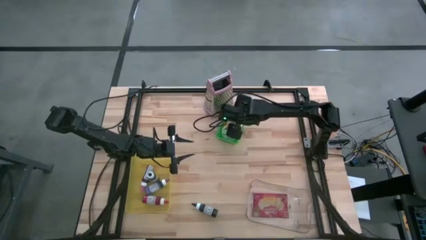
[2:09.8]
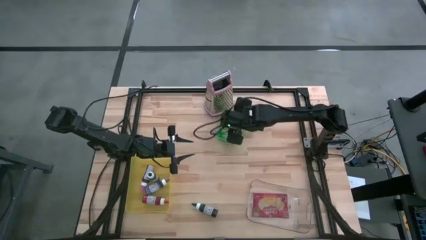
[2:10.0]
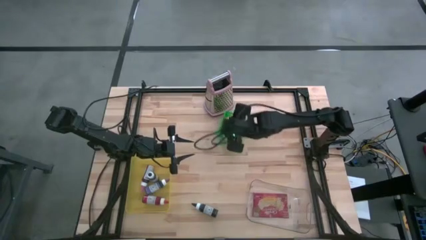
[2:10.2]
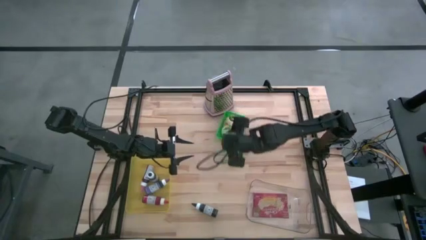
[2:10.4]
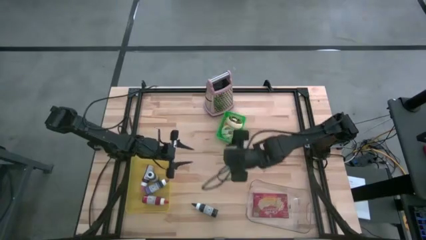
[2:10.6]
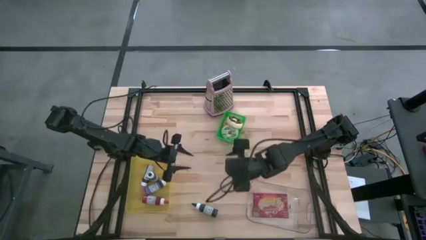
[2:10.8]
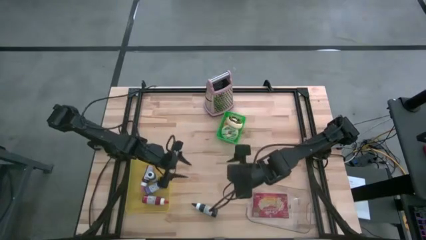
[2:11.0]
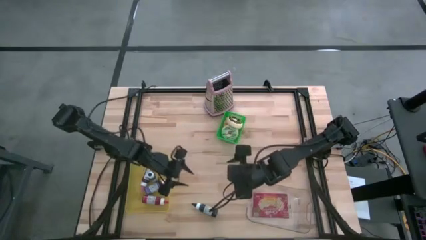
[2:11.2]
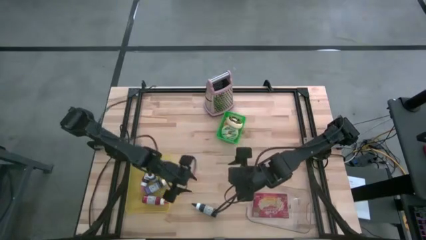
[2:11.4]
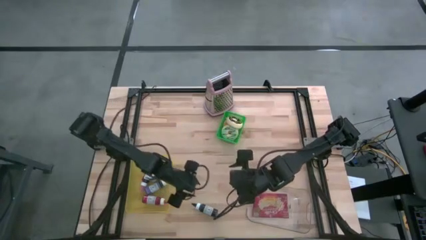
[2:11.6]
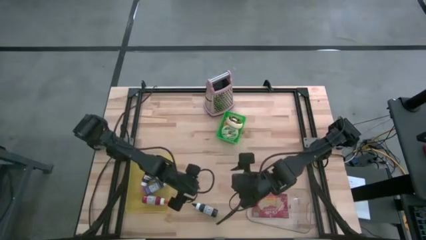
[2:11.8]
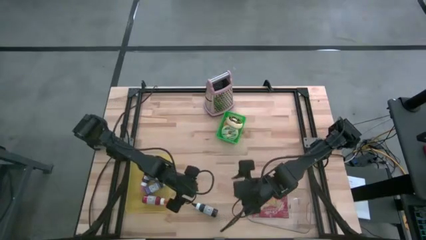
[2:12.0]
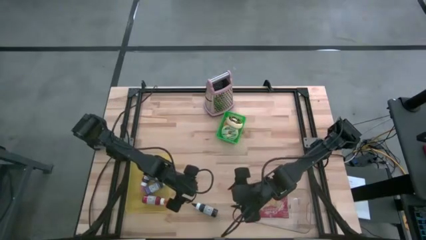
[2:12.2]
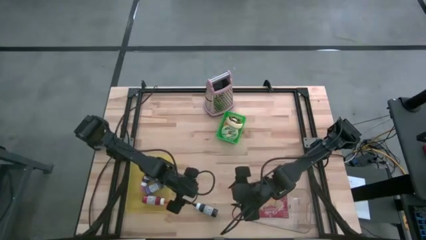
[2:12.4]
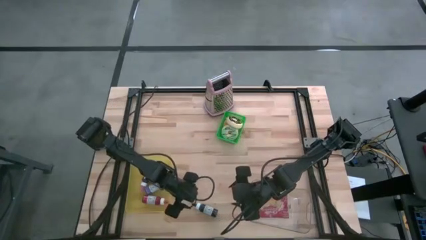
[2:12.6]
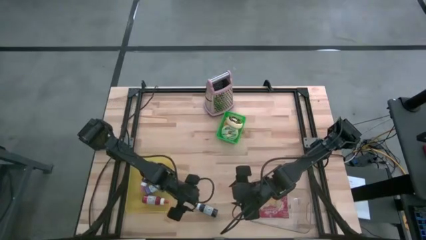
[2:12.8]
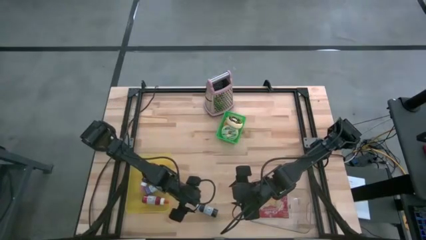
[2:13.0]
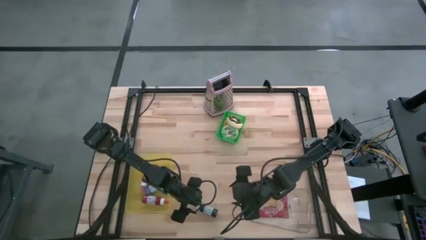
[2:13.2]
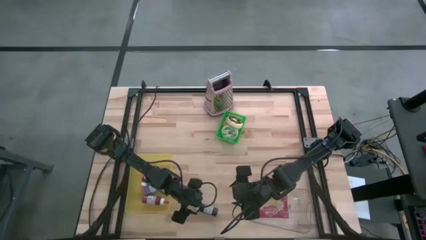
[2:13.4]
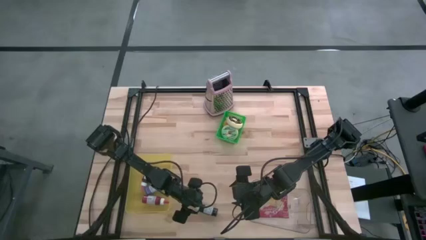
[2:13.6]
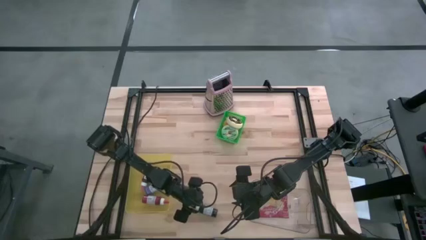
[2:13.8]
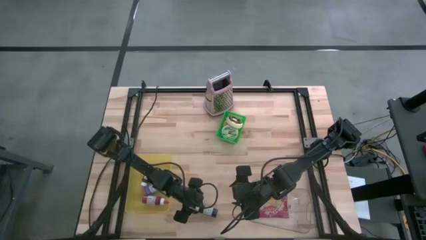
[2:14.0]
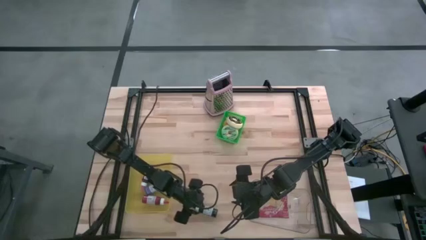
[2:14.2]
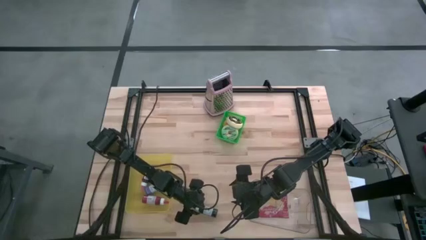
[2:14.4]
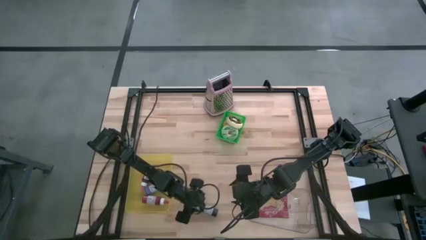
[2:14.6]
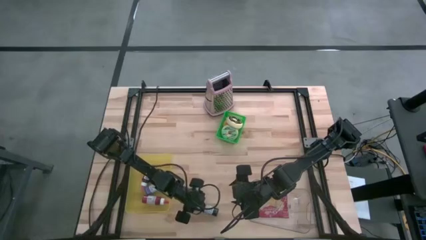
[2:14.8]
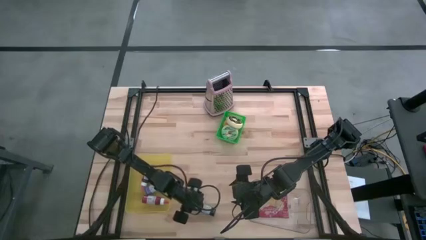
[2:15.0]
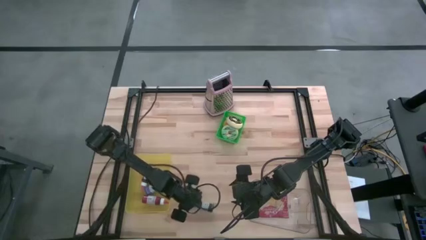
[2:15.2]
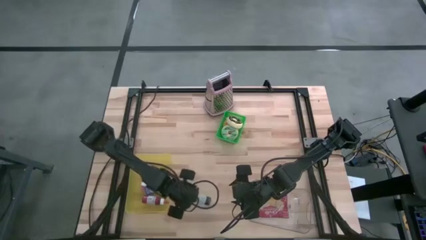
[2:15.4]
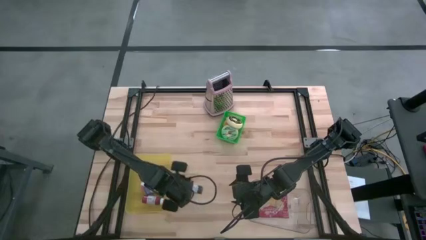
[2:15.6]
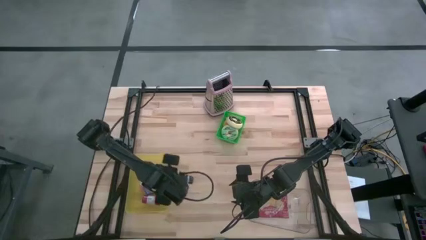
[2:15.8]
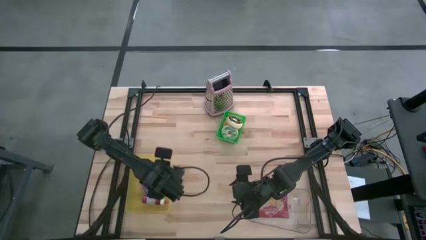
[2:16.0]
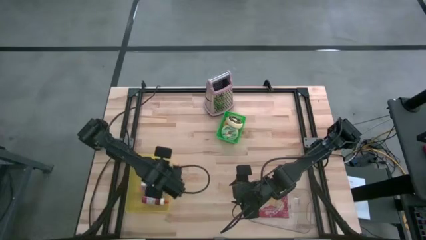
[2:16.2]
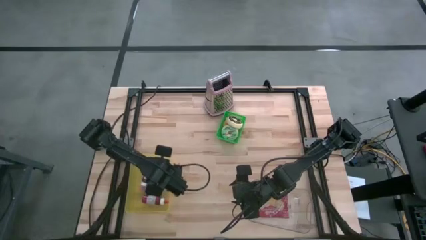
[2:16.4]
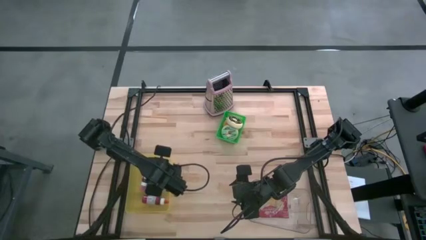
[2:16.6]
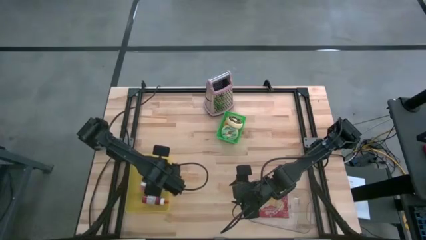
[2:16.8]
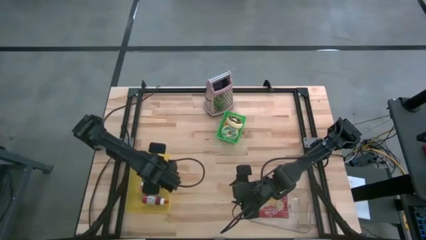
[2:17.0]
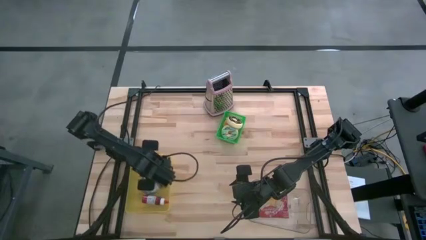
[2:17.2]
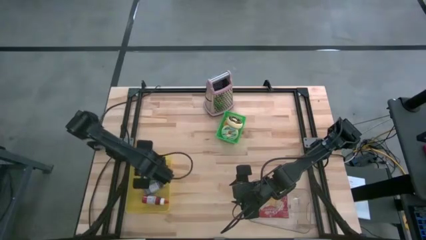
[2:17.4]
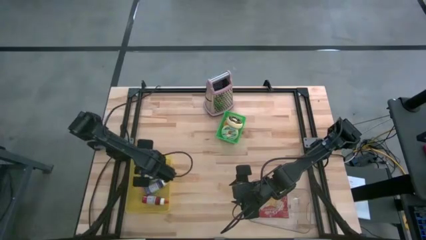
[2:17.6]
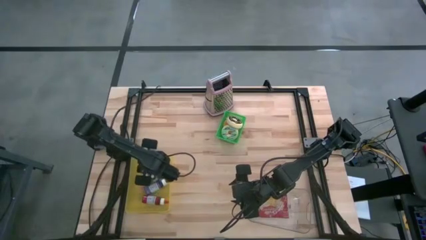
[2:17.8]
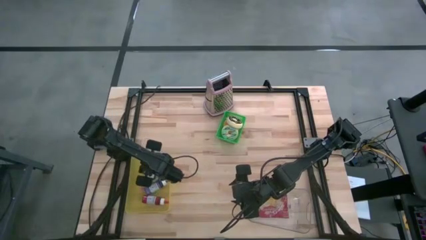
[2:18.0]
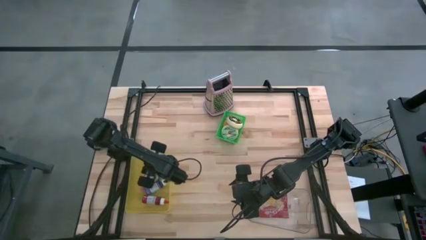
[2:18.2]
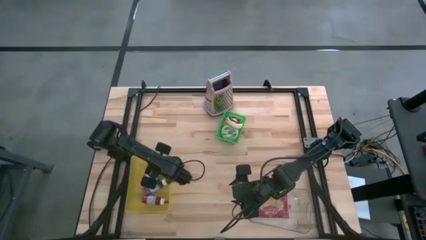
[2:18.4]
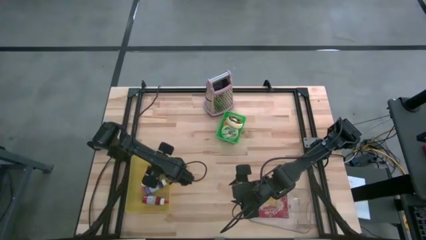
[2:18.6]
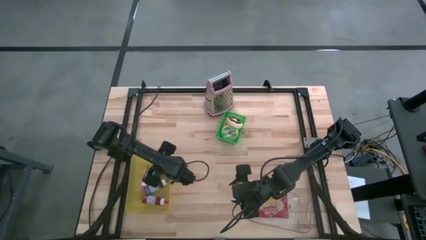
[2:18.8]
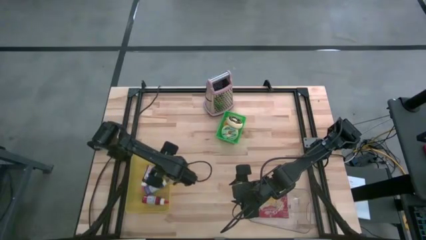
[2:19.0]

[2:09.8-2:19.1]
Task: Pick & Place Food Item
Put the black ink bottle into the yellow bin

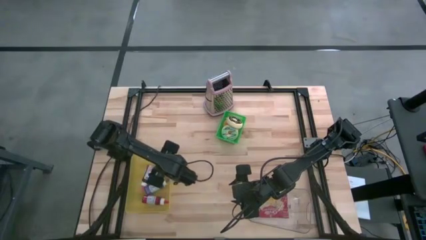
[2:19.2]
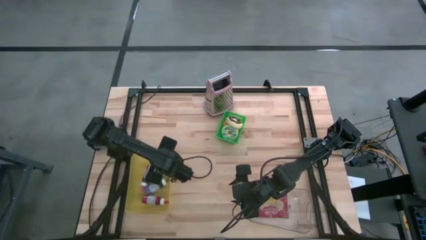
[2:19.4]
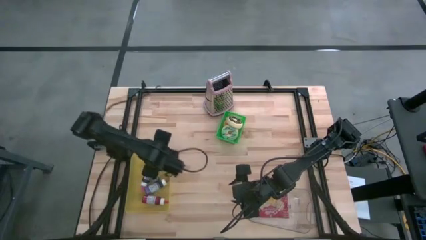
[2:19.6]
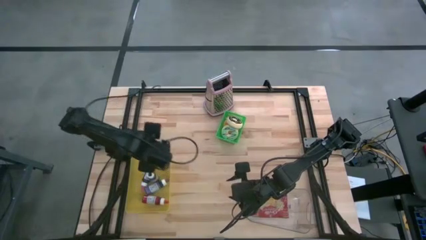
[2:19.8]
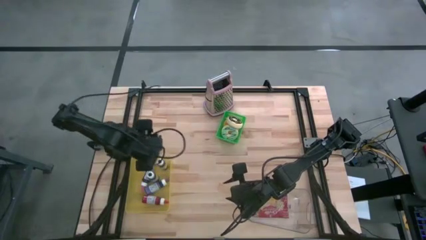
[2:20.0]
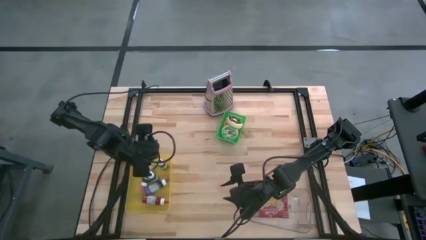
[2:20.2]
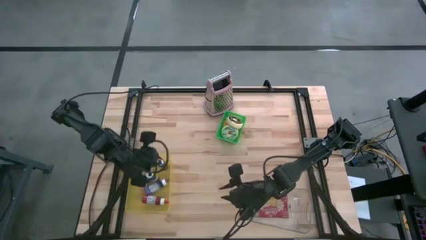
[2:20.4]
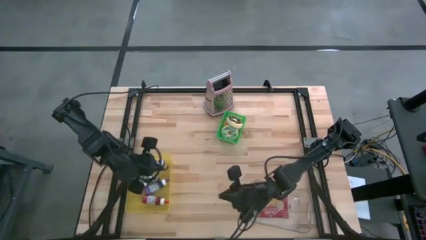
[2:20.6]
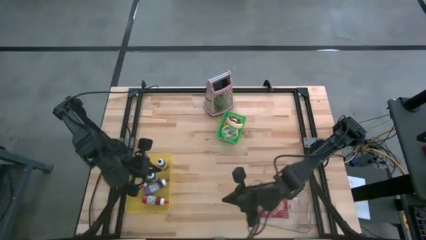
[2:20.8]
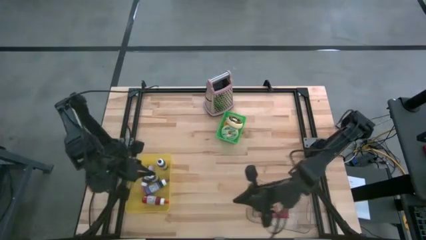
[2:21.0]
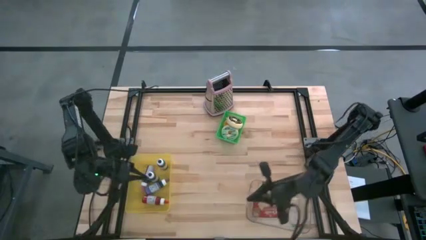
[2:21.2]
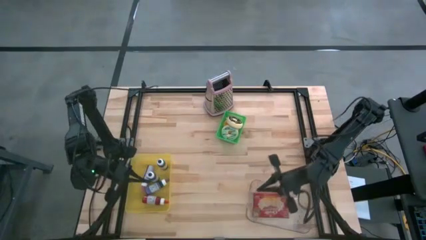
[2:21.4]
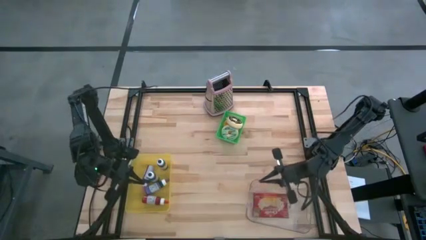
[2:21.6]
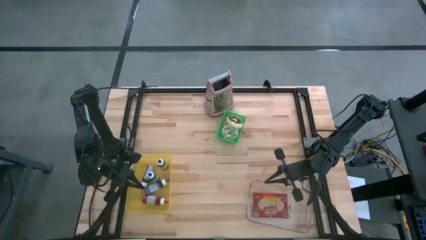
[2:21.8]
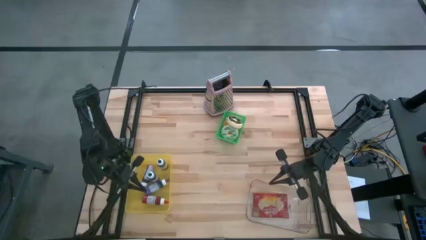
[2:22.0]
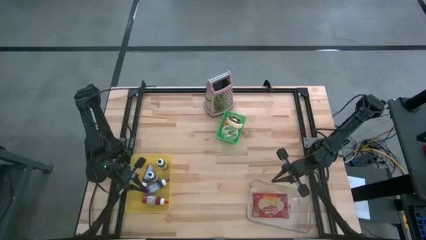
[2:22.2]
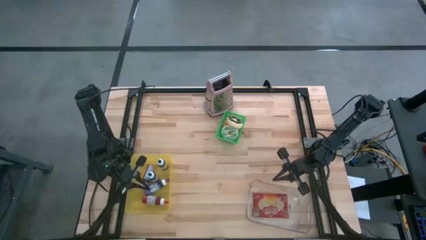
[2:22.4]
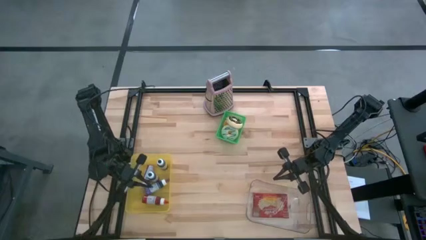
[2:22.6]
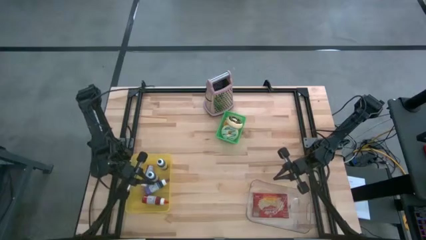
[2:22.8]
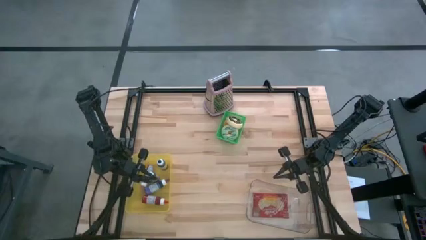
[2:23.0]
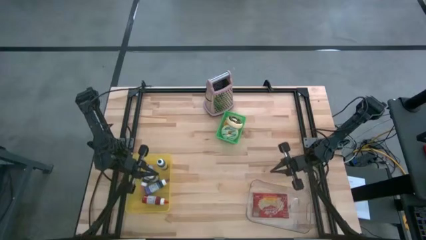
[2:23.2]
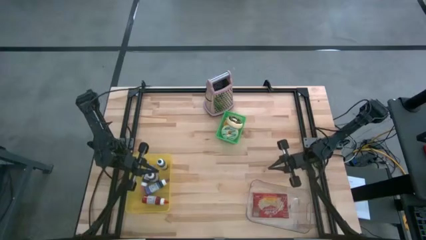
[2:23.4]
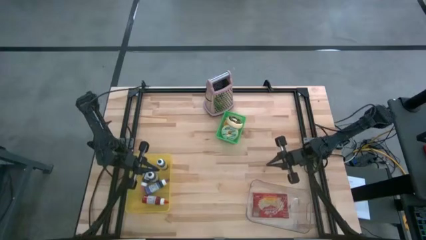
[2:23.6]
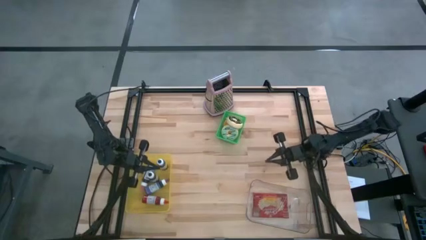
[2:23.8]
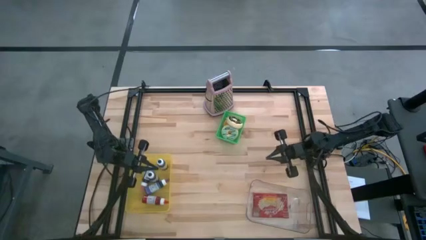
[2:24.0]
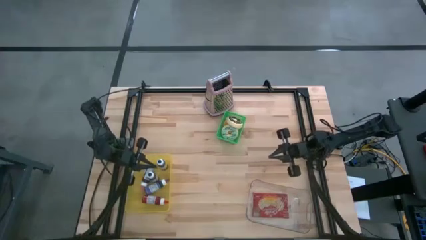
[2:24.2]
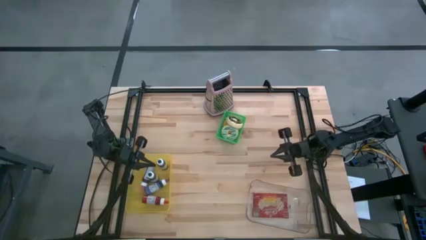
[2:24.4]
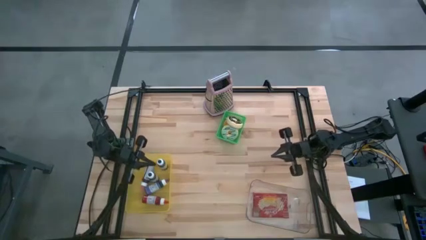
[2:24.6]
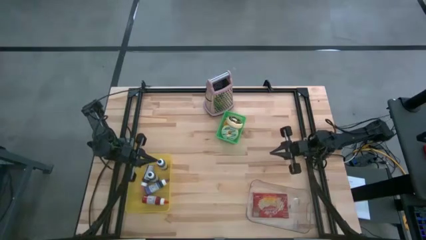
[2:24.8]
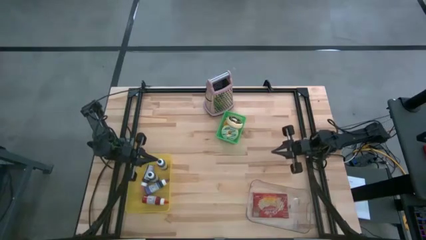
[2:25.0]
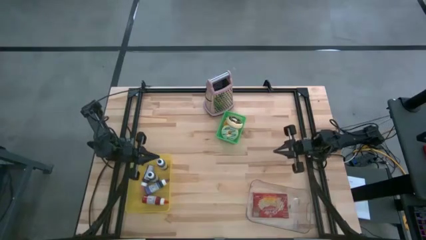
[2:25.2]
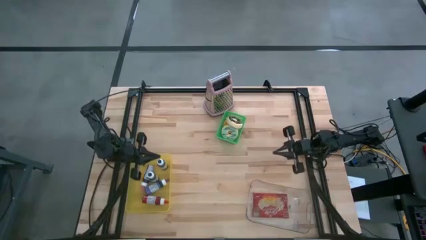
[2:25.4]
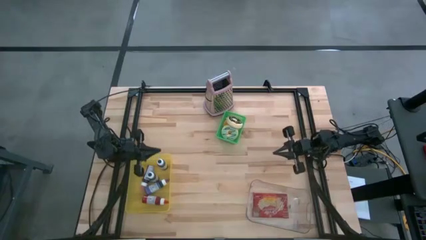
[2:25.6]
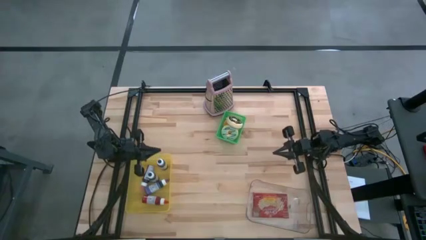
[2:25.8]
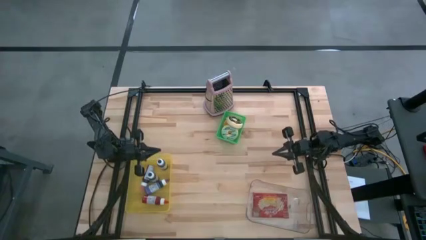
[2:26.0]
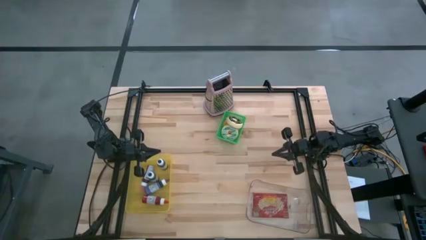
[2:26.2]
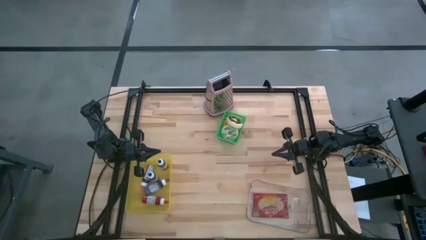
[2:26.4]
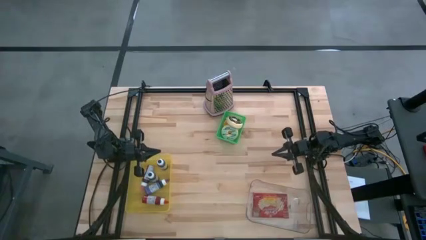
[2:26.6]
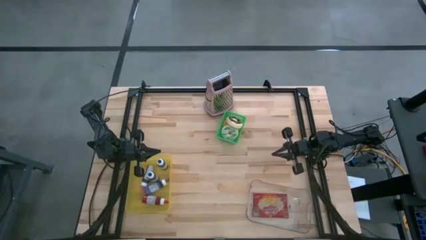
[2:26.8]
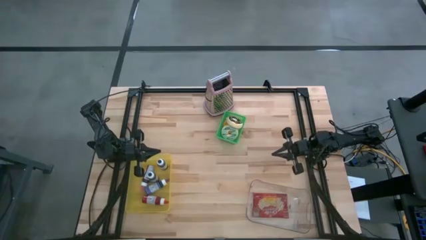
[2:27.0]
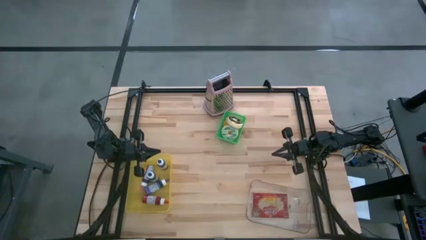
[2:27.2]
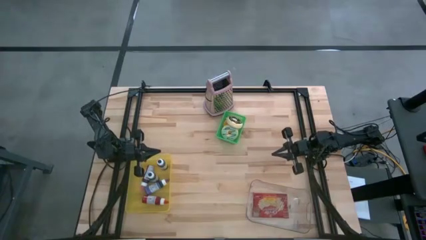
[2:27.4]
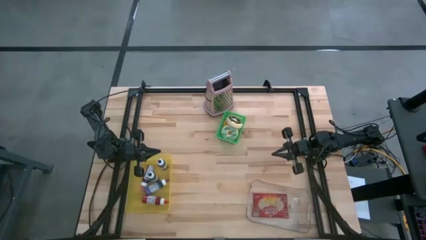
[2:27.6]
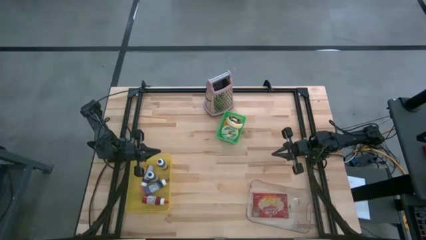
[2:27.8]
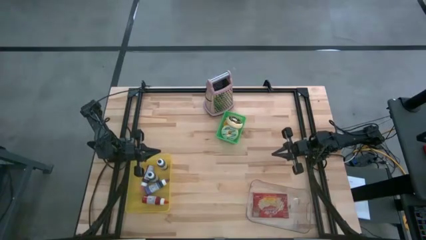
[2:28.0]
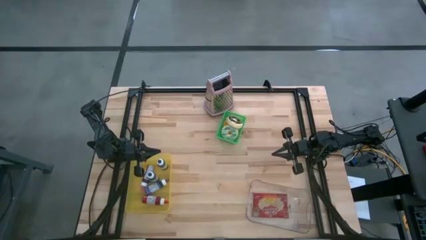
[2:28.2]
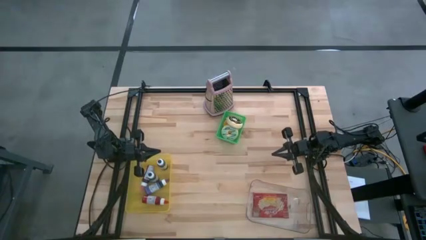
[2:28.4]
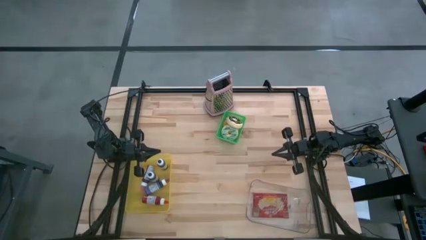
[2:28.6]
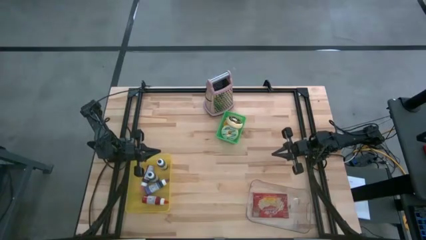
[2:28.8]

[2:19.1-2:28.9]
Return to Home Position
